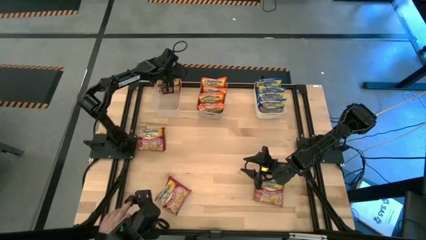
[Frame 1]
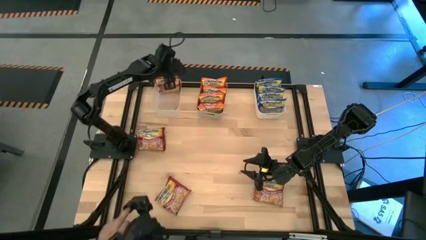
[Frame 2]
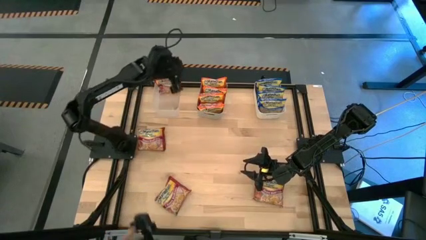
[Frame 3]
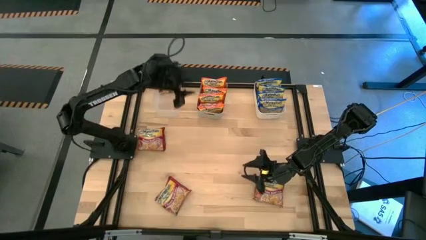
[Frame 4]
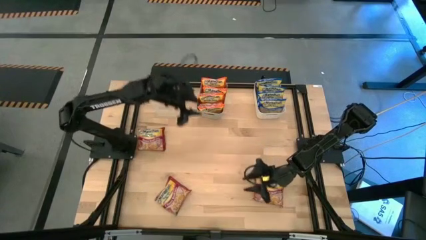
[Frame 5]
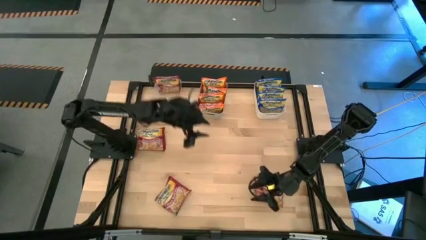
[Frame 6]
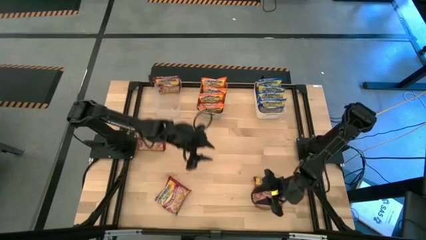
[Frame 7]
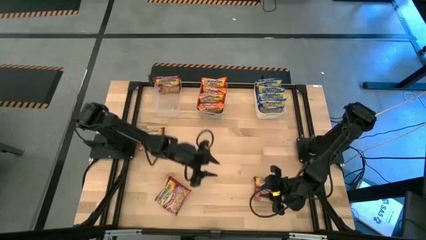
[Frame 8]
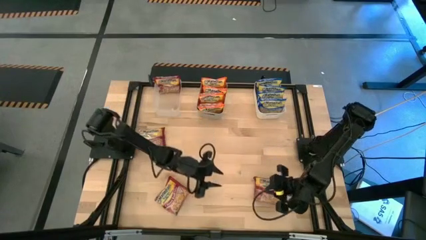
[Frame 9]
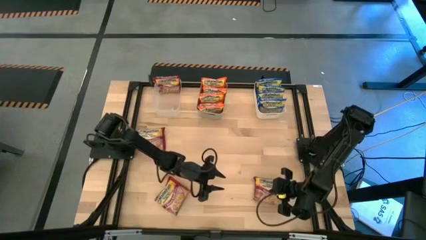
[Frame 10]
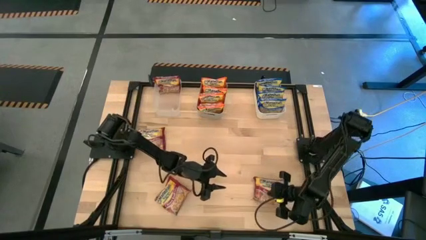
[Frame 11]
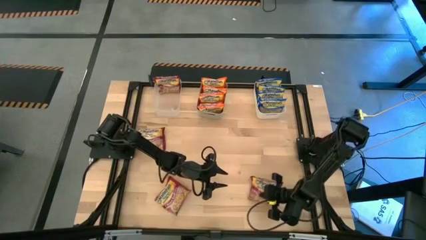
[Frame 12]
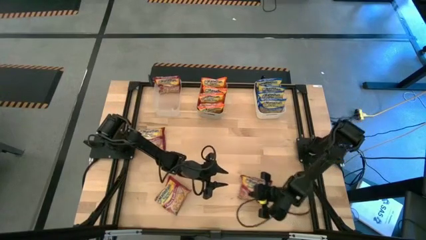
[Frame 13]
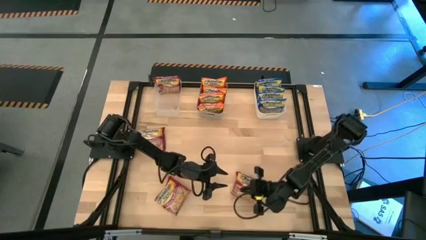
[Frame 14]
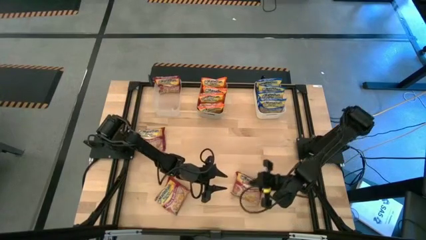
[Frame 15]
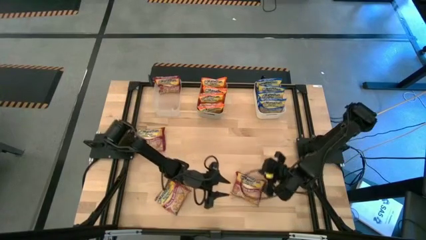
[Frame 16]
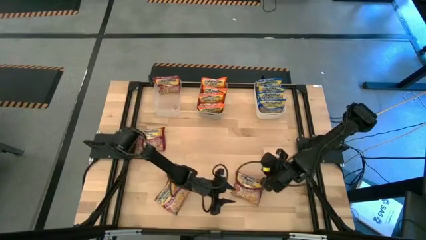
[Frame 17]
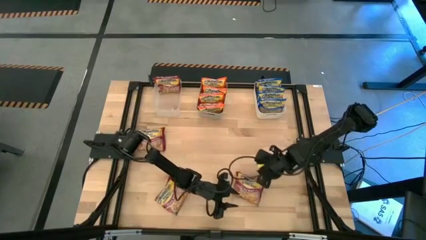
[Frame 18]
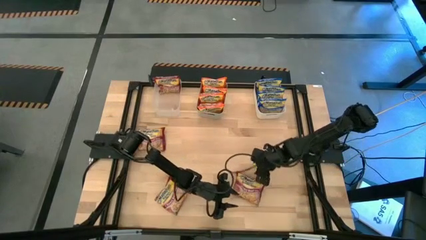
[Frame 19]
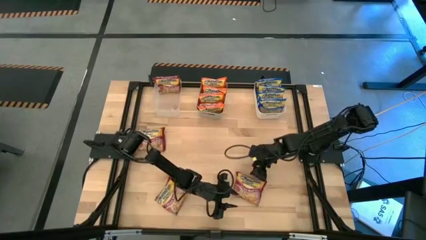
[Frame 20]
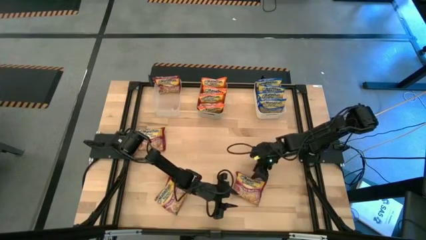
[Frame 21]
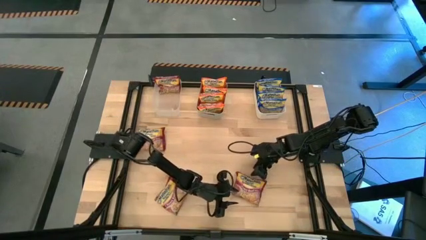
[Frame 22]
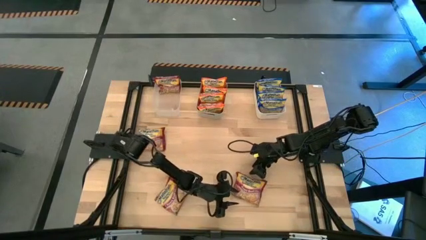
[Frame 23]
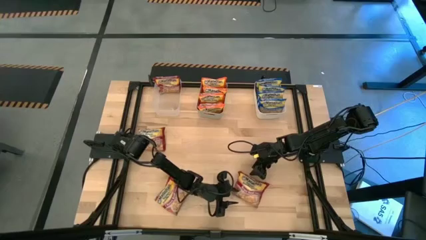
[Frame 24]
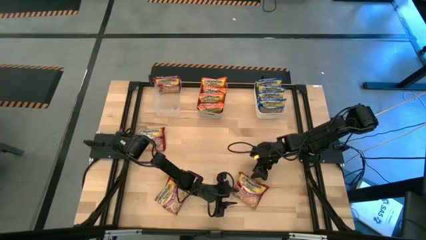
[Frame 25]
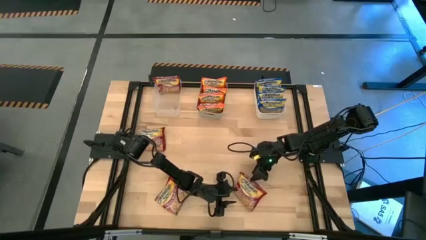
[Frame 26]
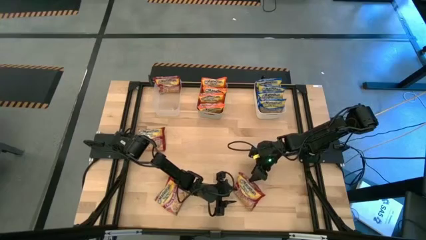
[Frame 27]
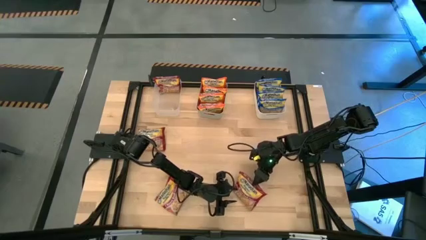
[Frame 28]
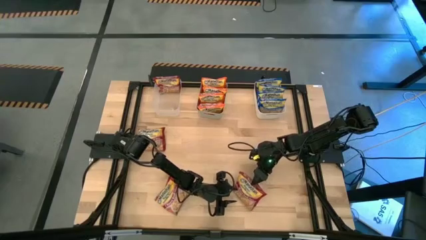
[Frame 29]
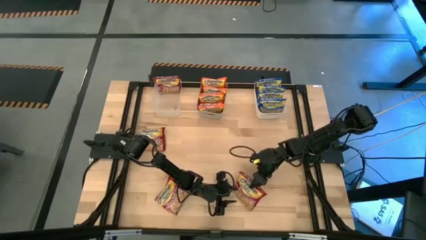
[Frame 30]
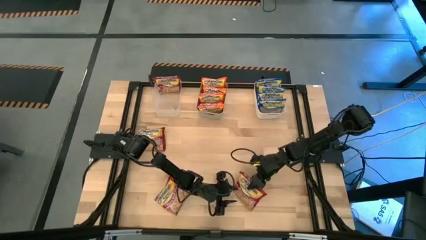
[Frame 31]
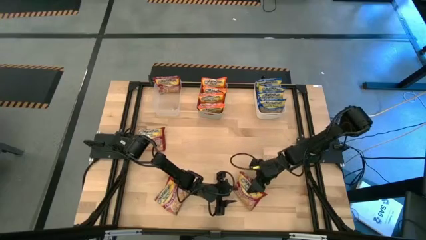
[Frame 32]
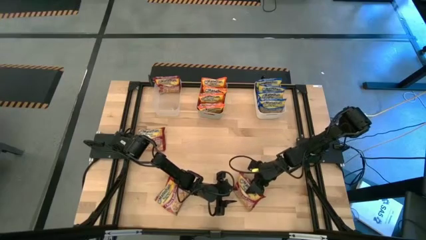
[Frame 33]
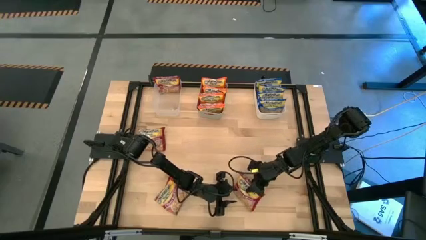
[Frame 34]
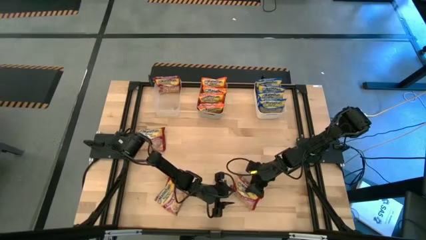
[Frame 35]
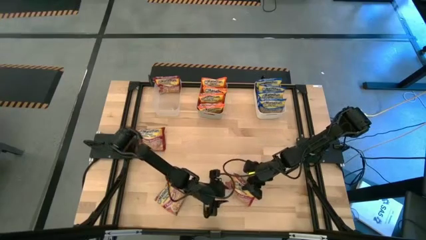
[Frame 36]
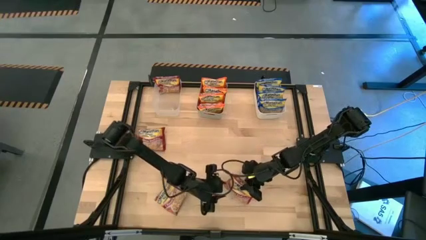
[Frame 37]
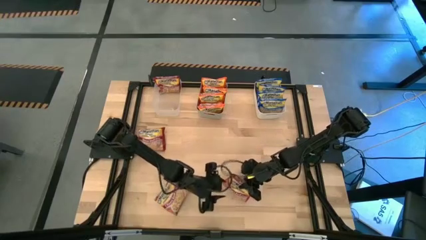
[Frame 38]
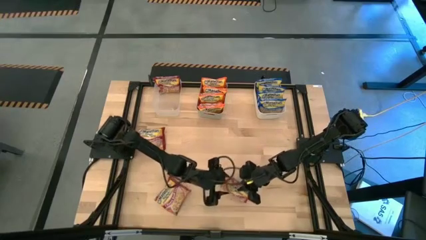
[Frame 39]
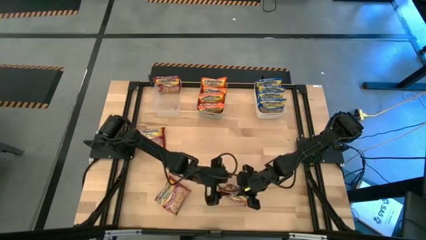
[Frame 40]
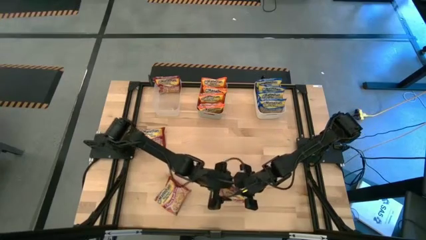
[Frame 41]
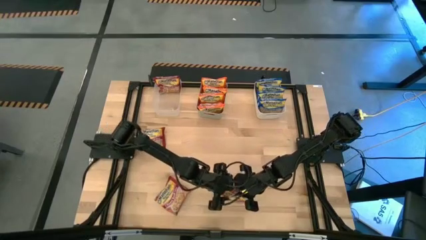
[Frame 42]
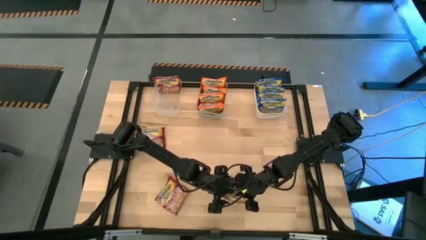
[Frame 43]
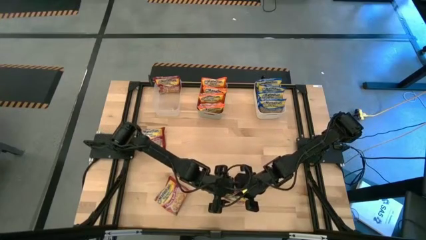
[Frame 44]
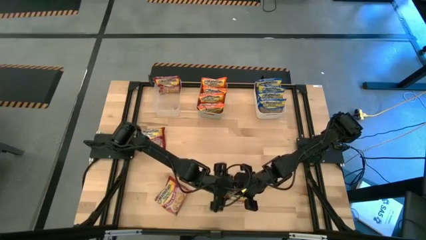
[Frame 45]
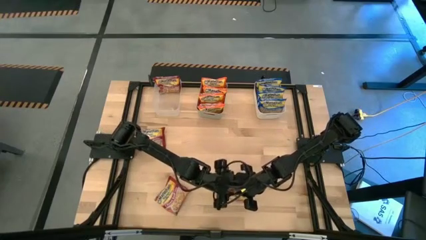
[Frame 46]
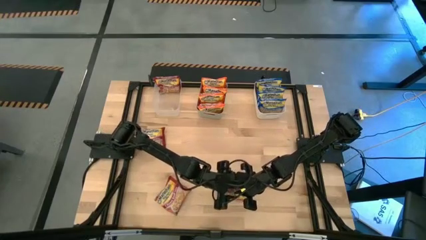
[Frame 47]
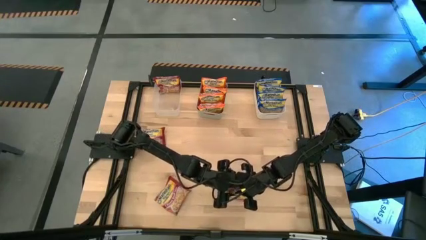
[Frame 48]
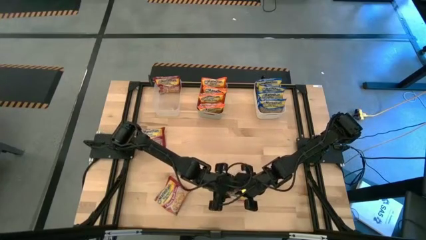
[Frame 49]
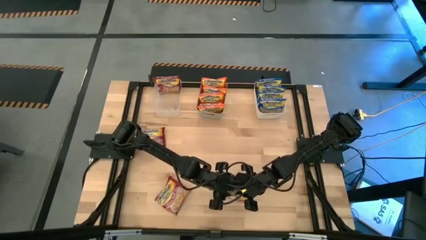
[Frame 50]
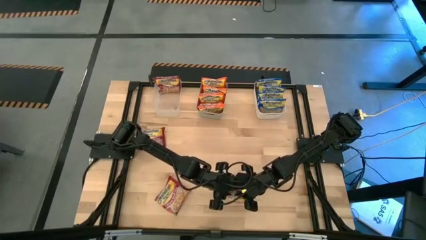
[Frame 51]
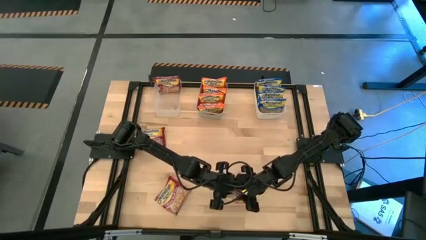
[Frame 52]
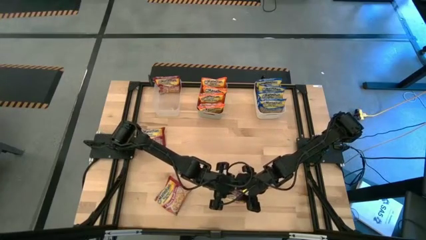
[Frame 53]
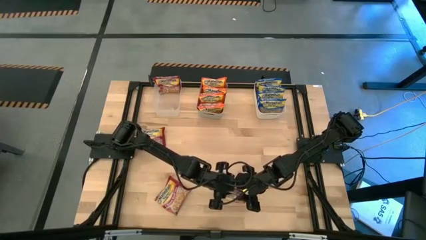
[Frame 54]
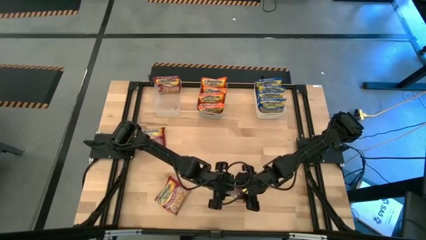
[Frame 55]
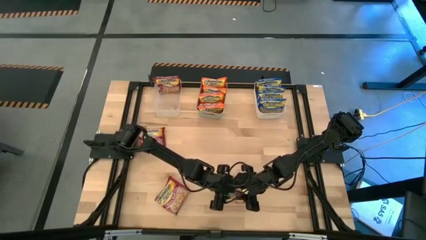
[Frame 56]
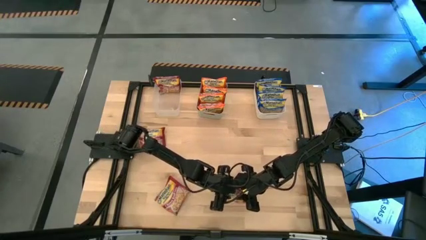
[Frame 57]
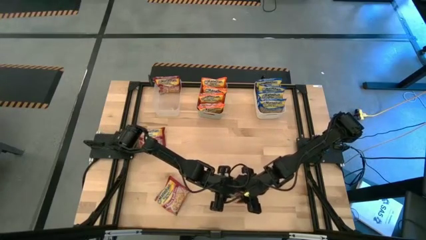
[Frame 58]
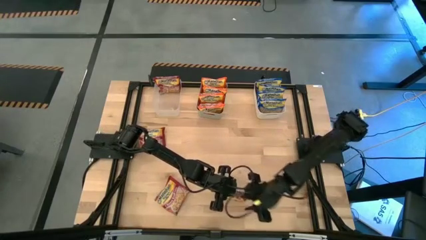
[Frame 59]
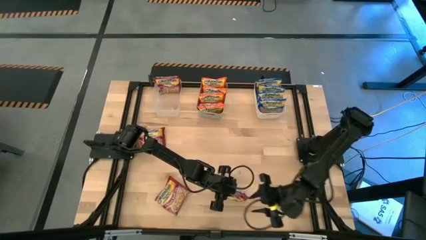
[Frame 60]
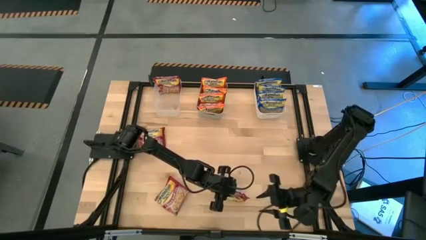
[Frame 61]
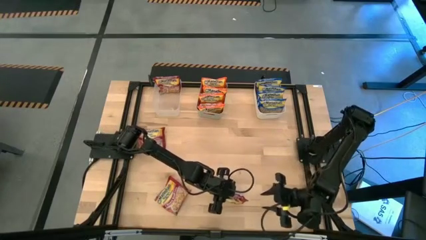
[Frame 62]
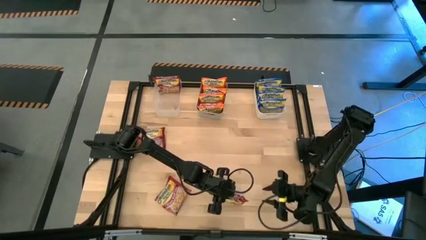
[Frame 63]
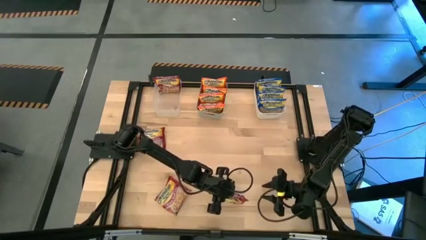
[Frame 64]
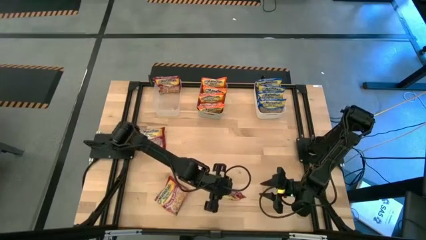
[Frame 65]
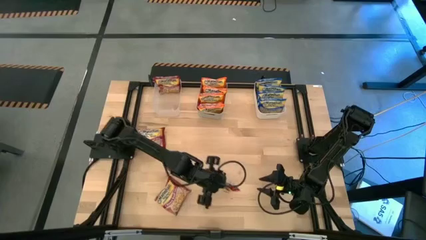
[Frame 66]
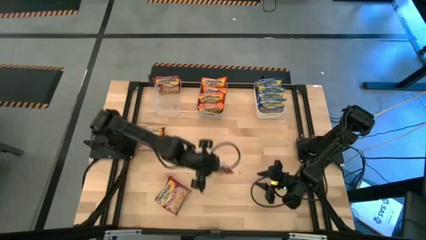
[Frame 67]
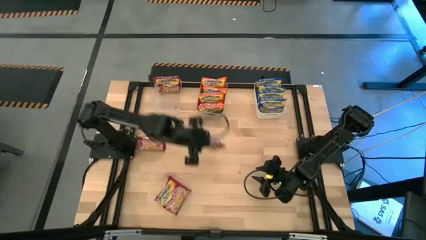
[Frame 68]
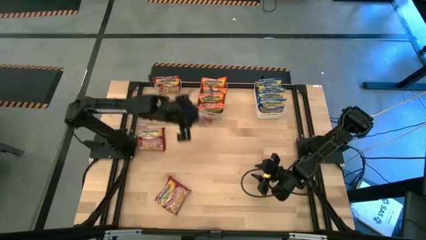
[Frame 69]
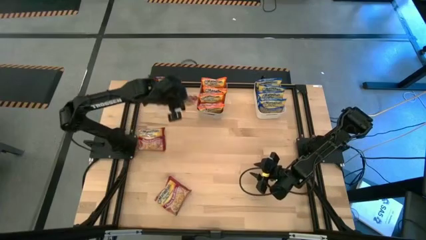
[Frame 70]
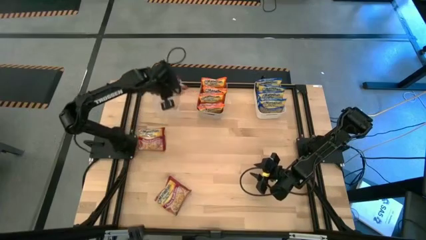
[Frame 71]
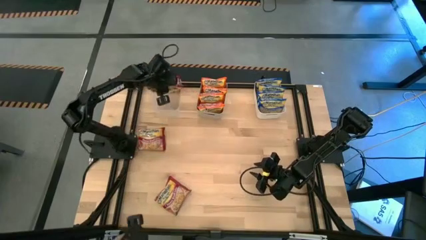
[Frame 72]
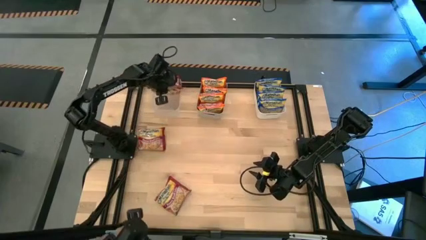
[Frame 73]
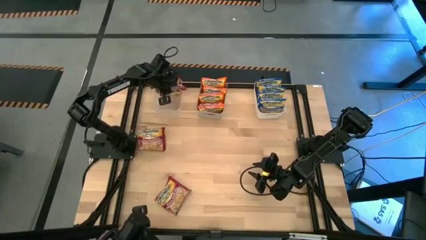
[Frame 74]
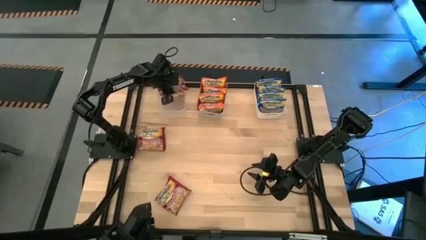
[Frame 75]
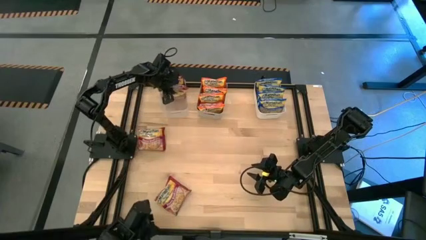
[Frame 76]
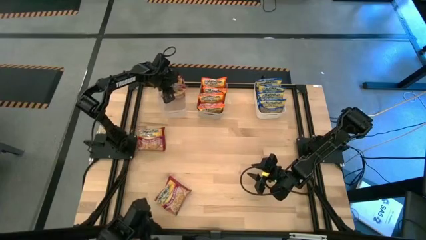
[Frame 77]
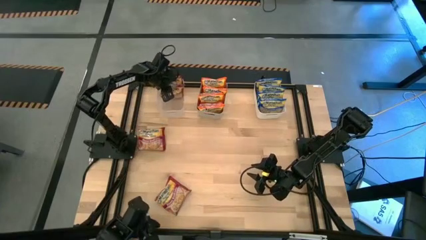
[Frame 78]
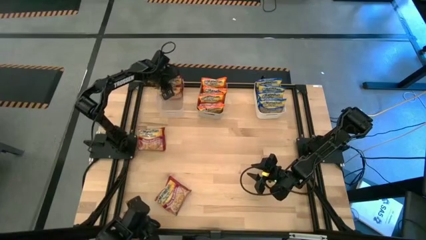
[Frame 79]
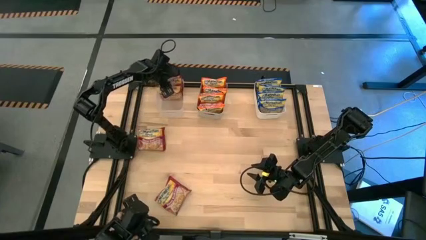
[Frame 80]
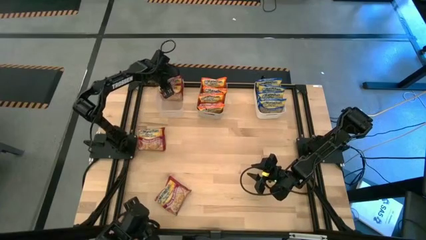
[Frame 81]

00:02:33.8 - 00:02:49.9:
Task: Sort Maruchan noodles
Put the red noodle pack into the transparent bin

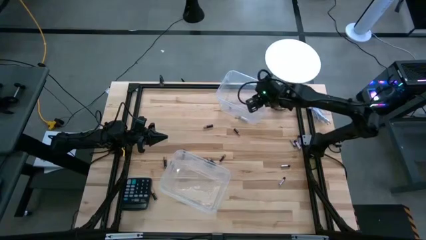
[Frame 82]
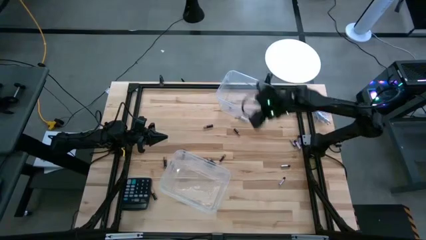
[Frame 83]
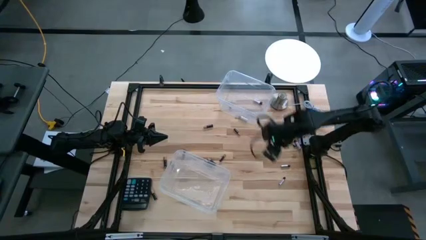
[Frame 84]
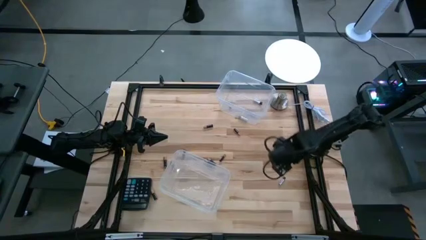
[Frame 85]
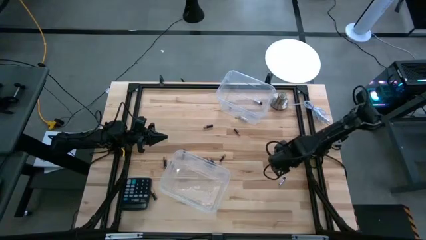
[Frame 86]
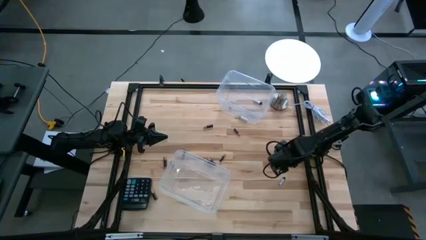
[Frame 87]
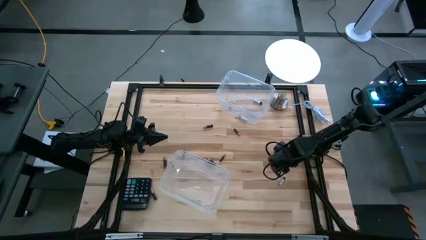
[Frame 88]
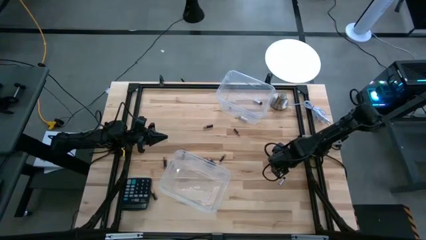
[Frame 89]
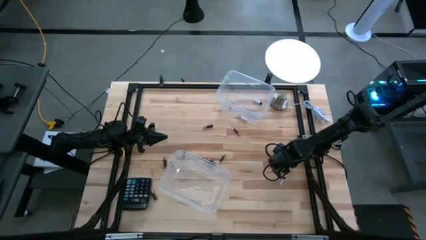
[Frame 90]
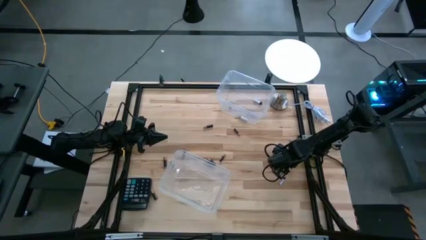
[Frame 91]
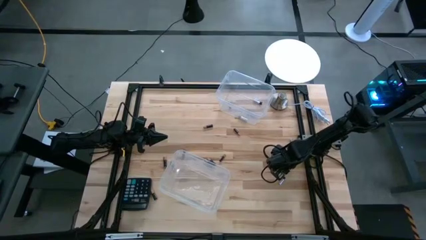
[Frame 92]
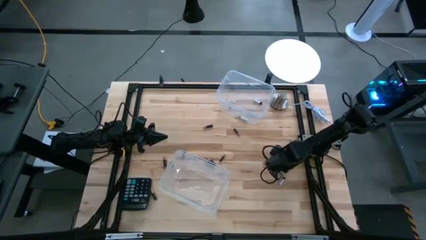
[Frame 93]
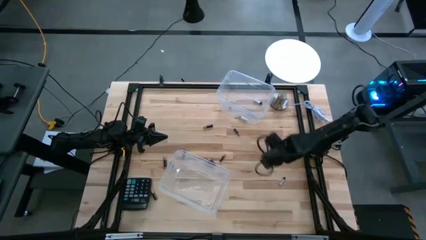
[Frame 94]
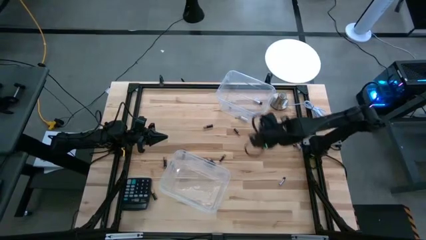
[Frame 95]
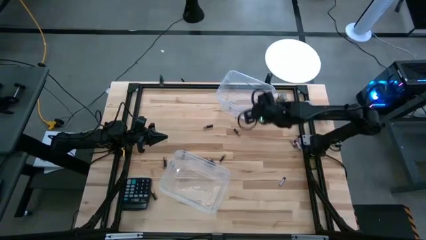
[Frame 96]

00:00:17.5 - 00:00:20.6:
Task: Sort batteries
Put the silver battery into the top transparent bin
